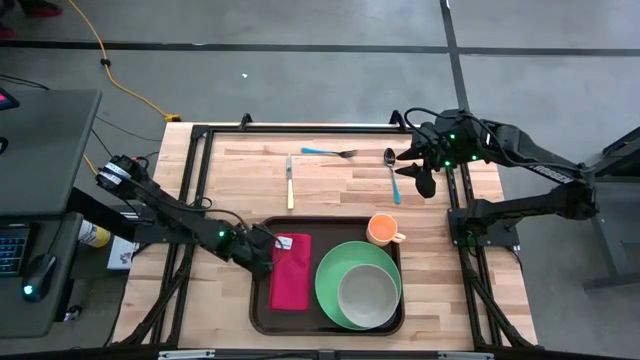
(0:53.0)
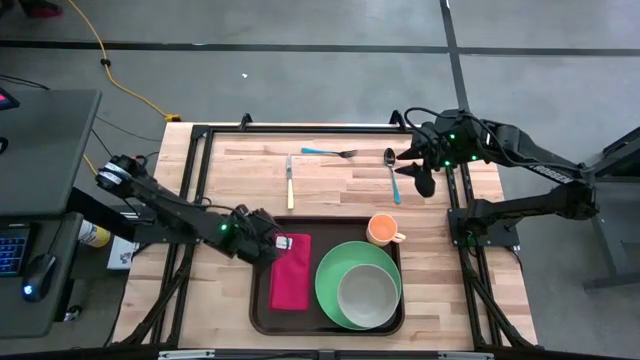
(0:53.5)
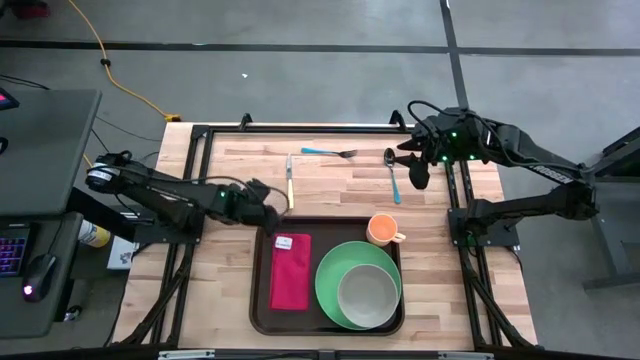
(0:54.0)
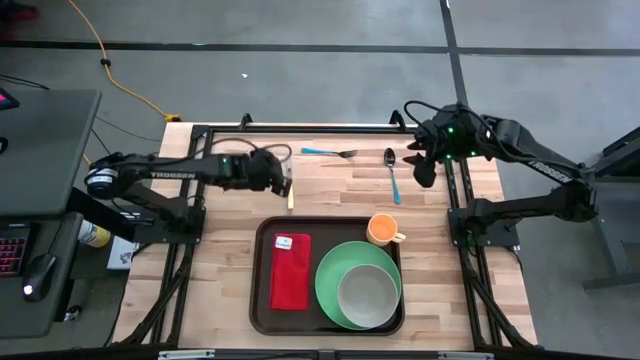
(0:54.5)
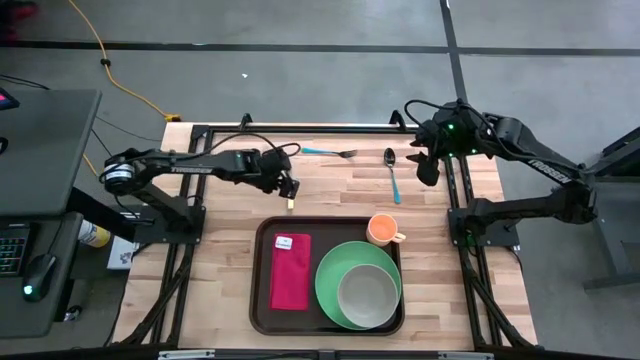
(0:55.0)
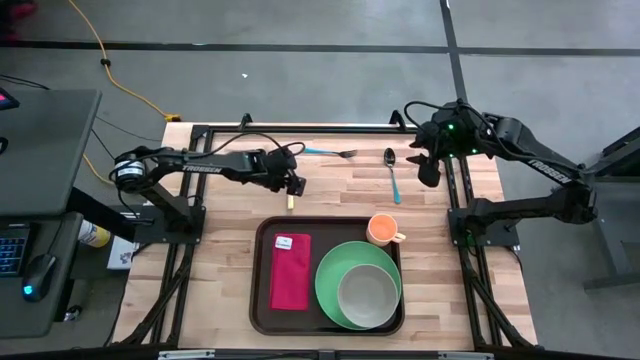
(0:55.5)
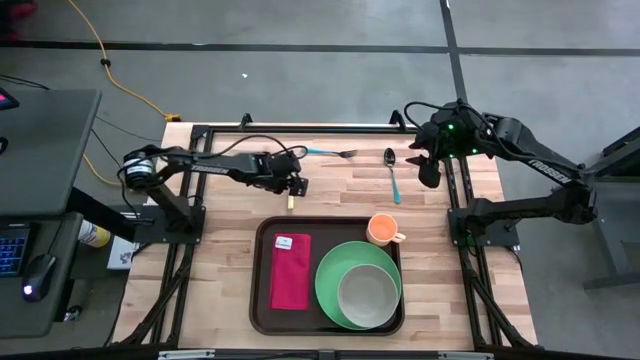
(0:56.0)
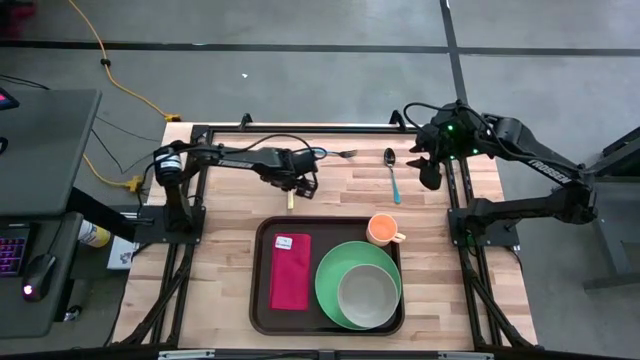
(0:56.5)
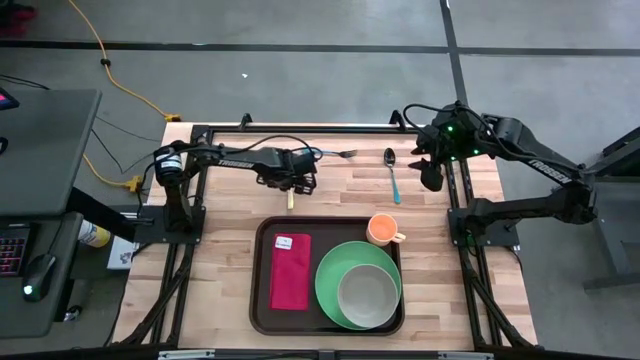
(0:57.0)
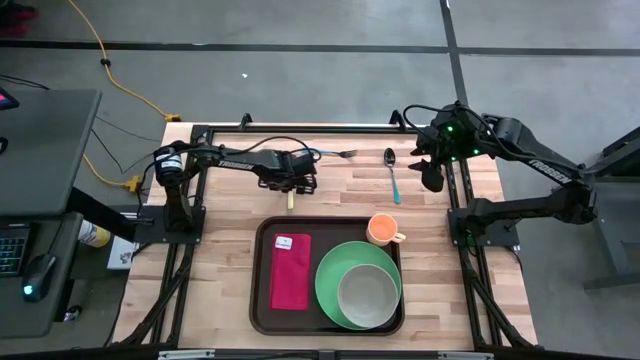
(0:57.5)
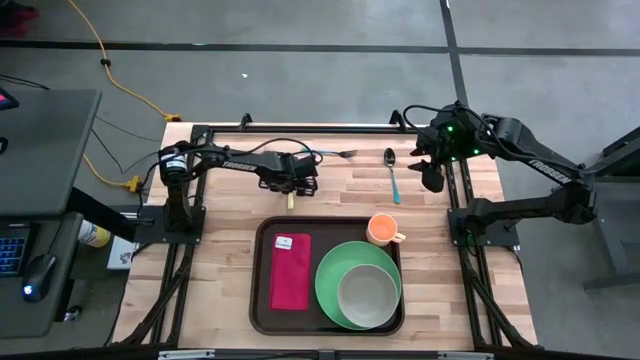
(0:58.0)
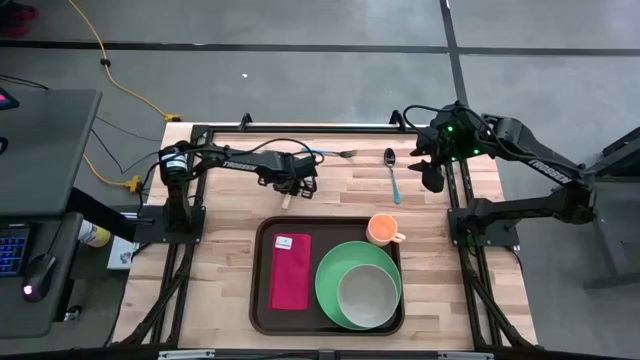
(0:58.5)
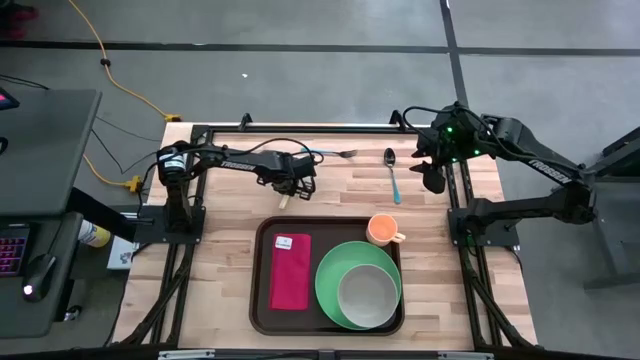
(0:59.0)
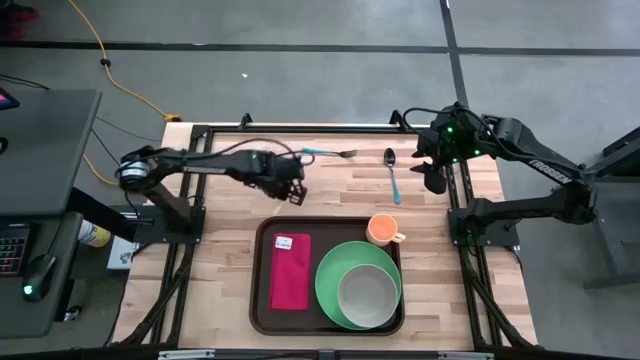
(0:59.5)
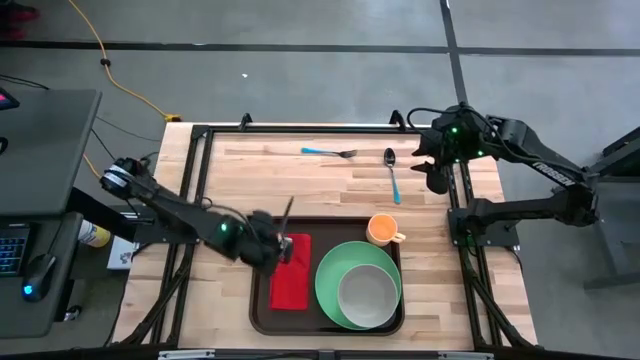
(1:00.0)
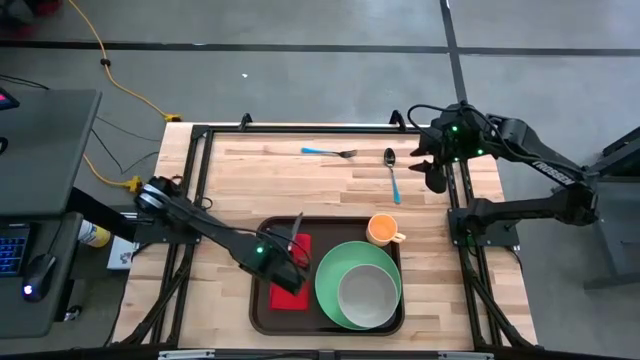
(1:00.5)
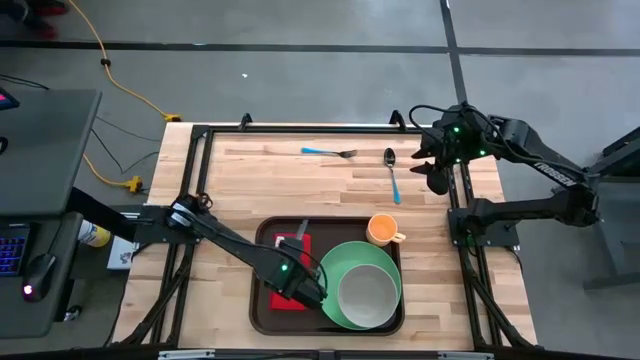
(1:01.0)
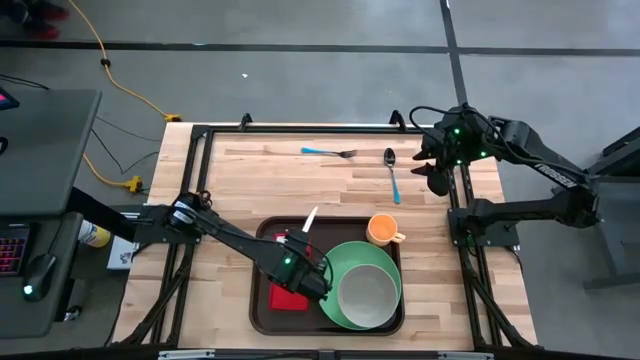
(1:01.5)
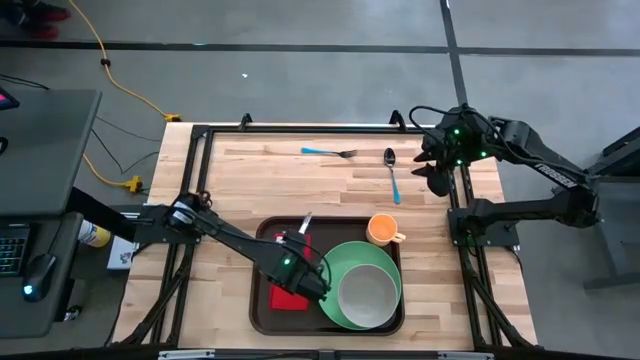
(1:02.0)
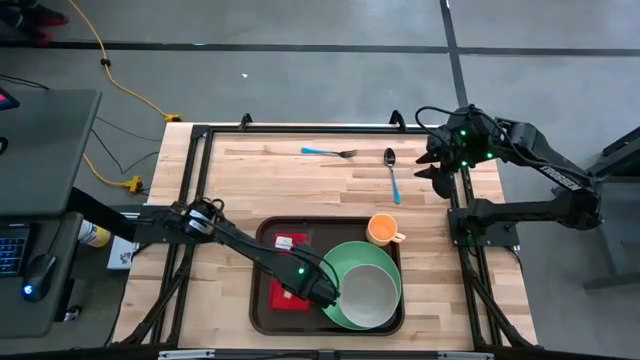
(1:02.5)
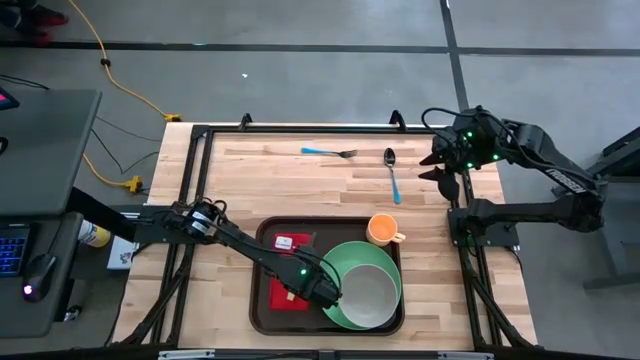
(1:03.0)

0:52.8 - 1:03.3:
Task: Set up tray
Put the yellow knife on the top of red cloth table napkin

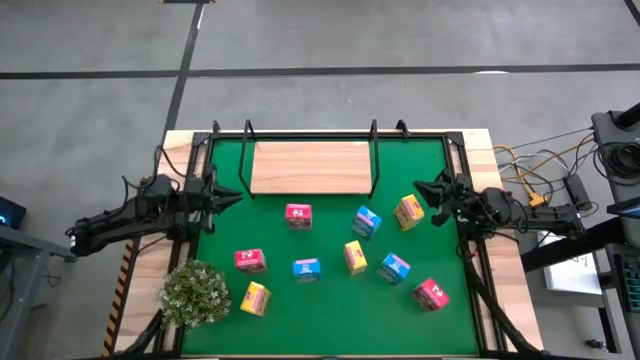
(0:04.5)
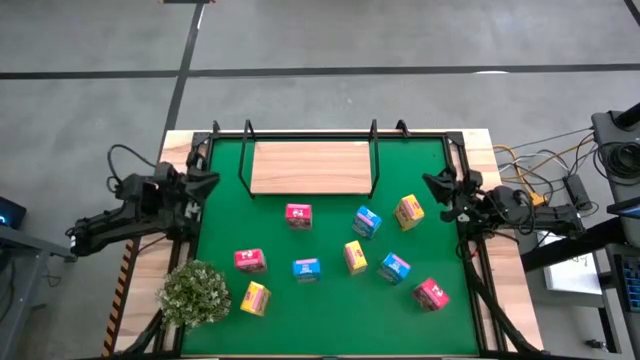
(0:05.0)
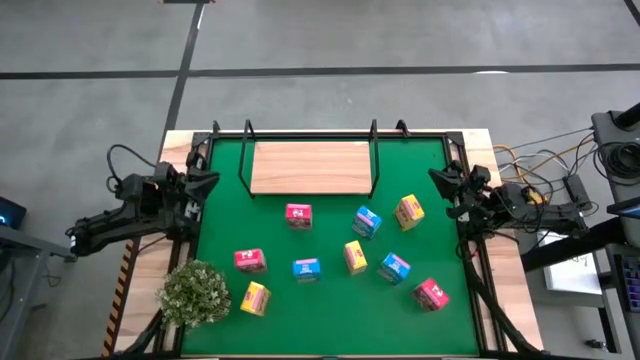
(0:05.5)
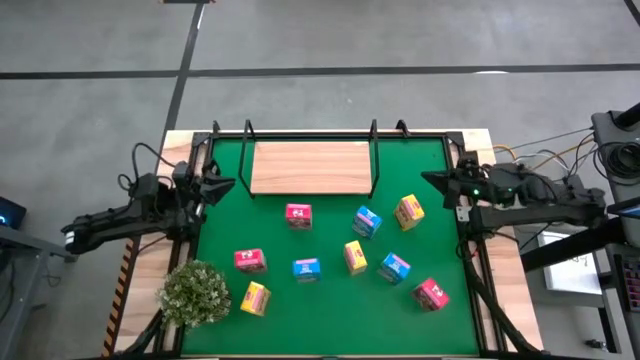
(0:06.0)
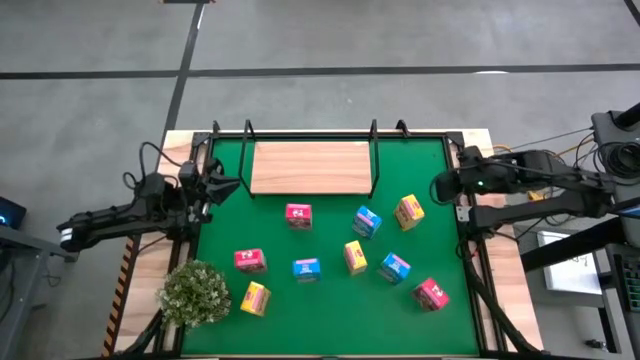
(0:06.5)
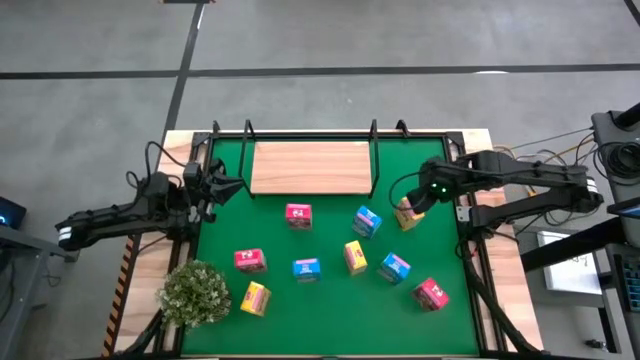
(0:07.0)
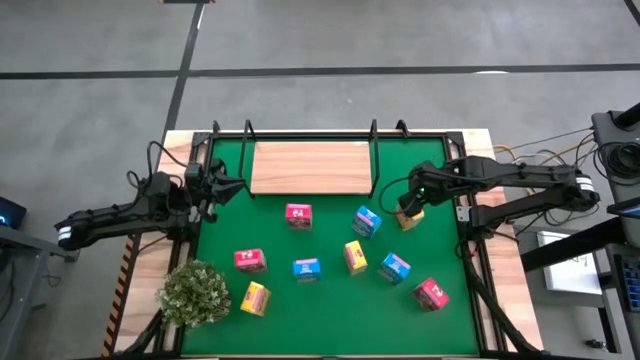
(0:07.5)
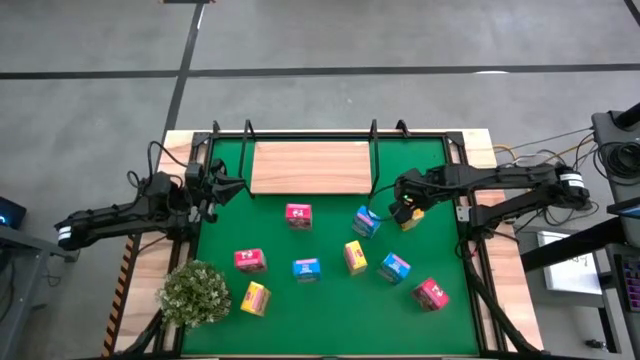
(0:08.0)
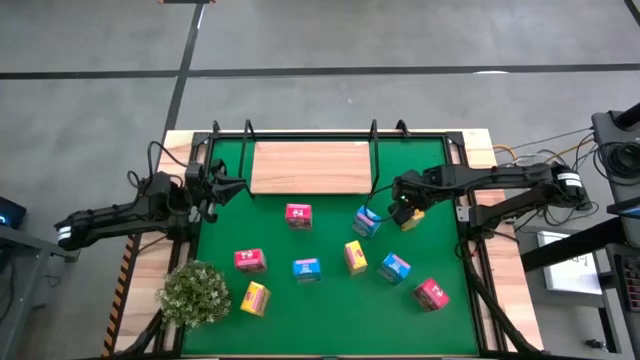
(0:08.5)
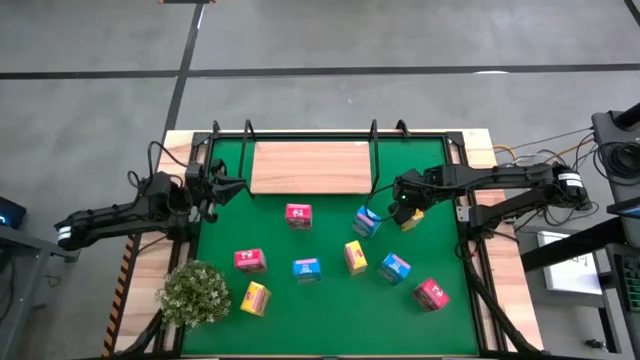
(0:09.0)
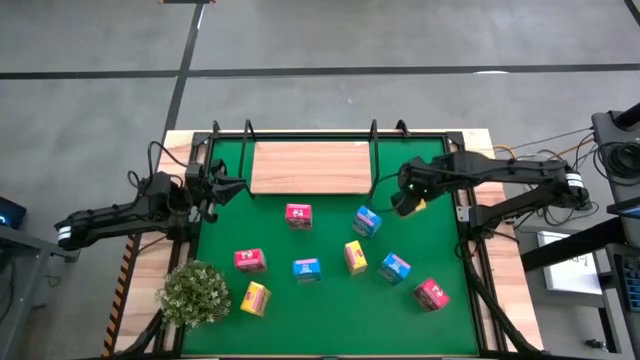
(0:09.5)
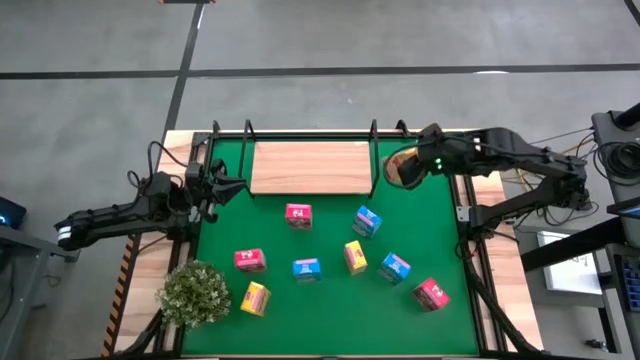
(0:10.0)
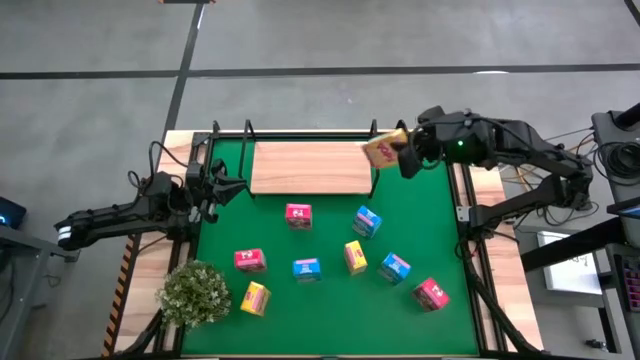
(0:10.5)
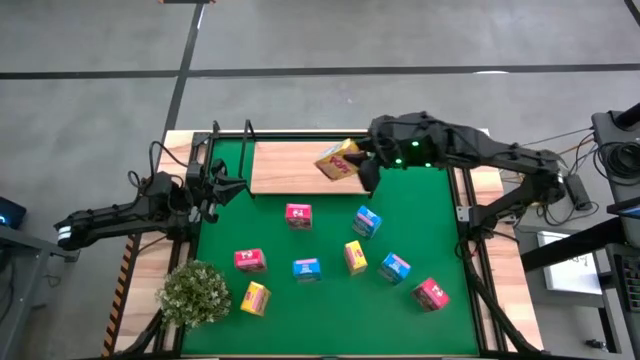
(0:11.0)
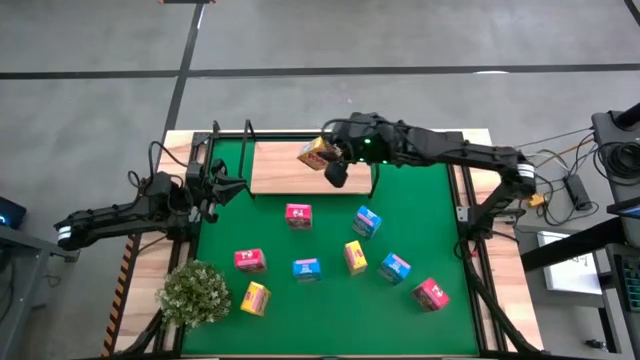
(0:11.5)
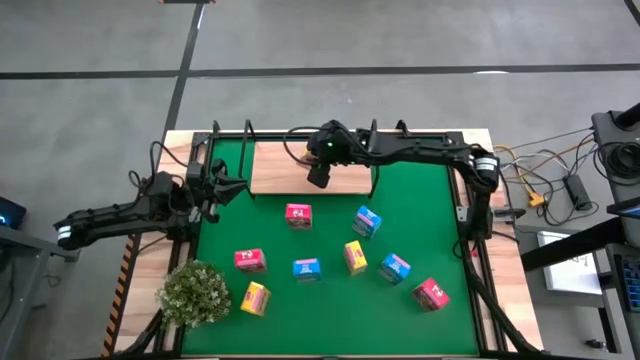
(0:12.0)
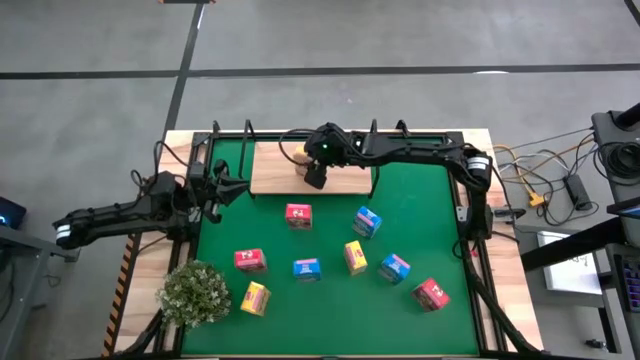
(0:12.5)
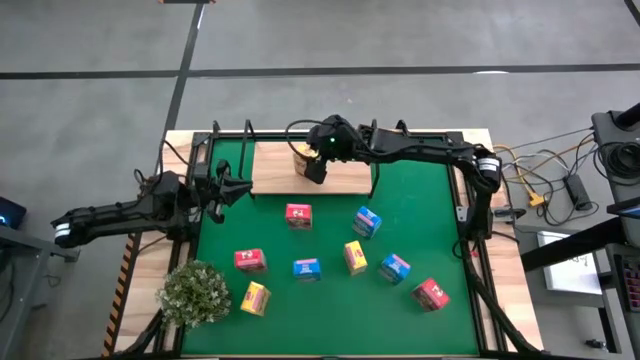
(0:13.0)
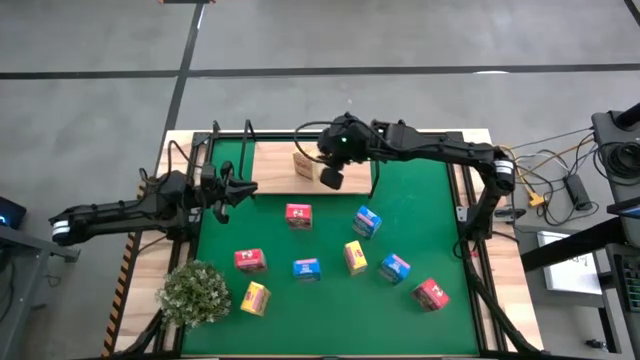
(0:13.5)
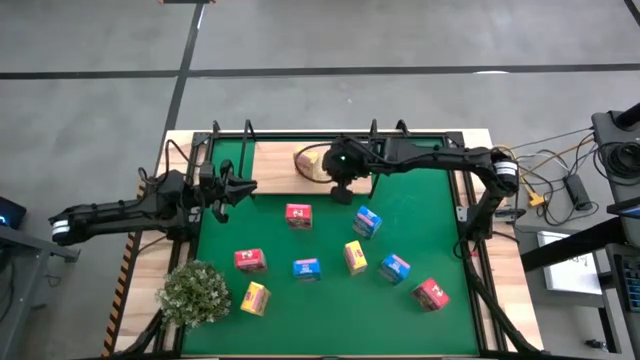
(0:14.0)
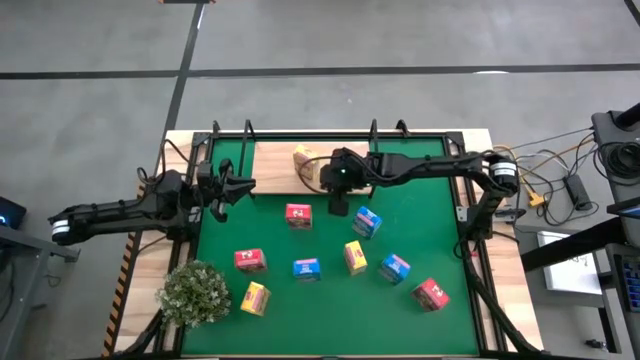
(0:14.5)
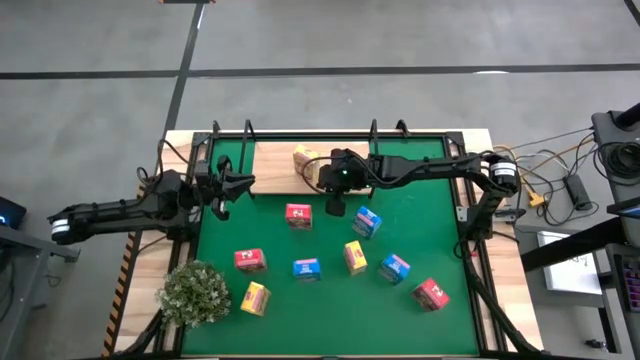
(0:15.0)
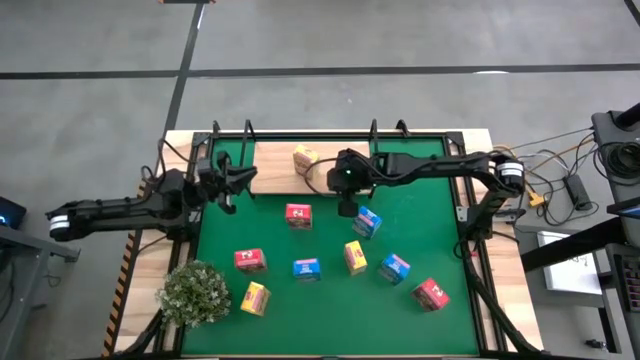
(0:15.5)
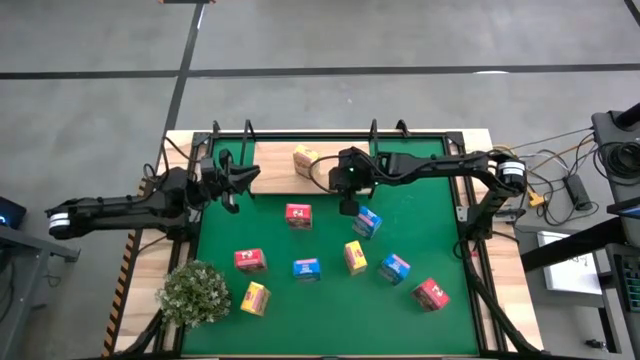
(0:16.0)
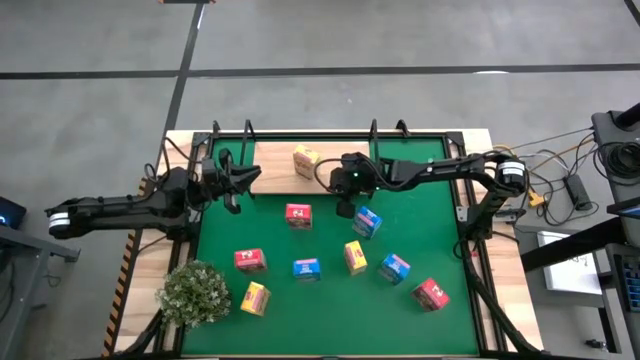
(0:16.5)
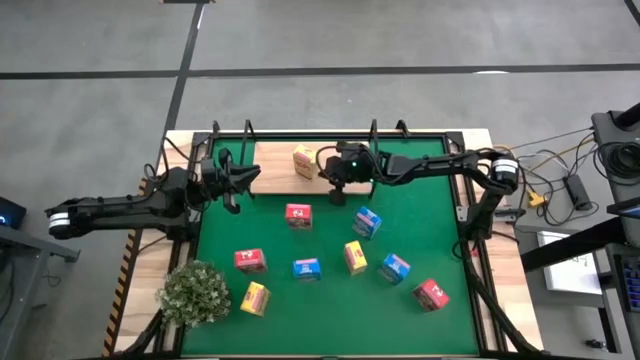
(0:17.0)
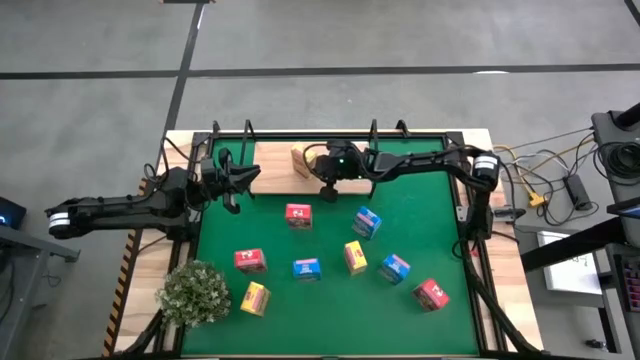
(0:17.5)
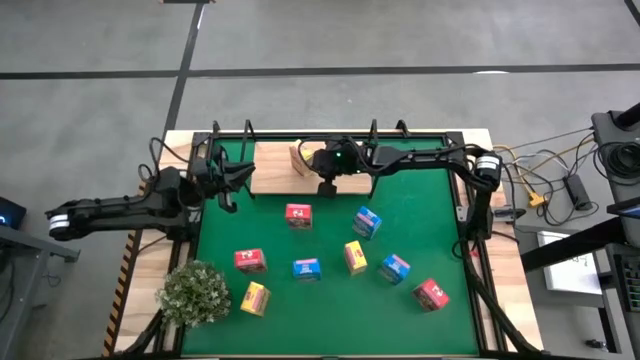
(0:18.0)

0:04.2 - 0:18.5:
Task: Stack cereal on shelf
Put the top yellow cereal box on the shelf
